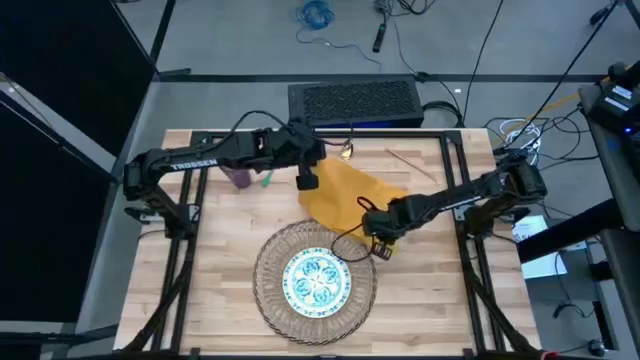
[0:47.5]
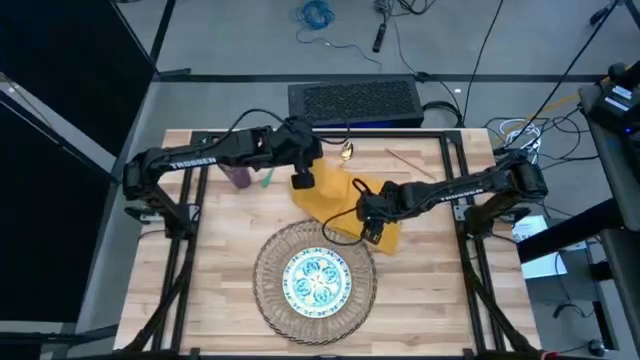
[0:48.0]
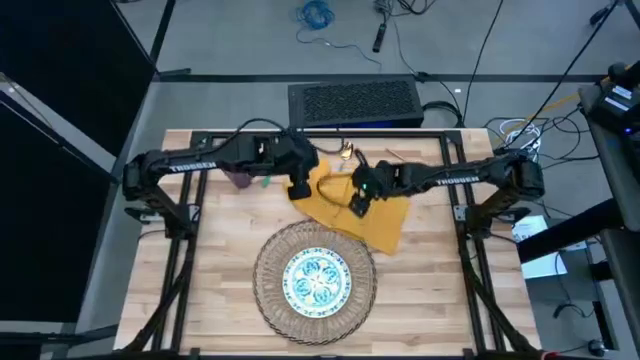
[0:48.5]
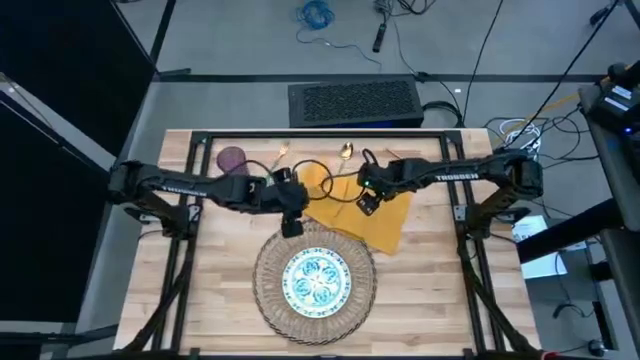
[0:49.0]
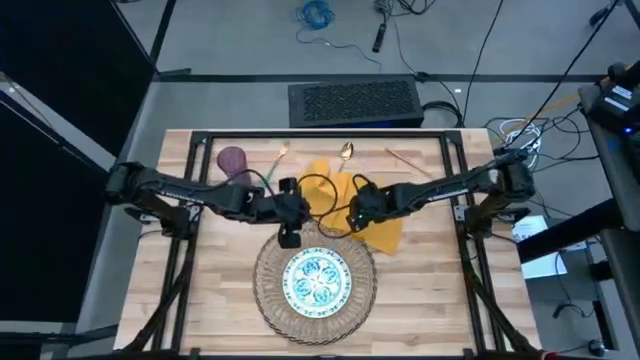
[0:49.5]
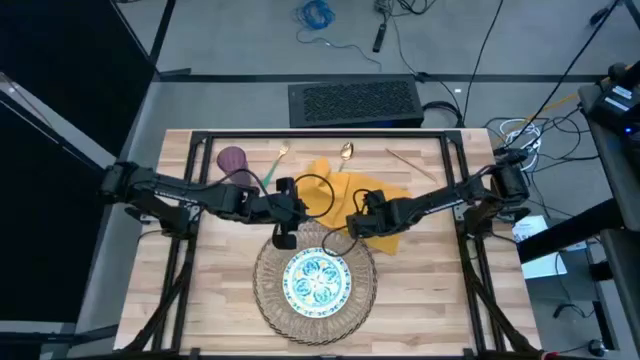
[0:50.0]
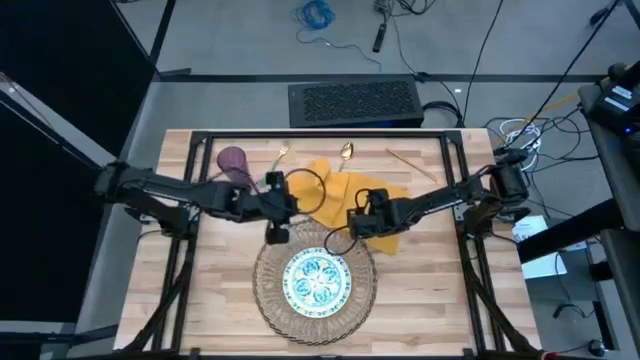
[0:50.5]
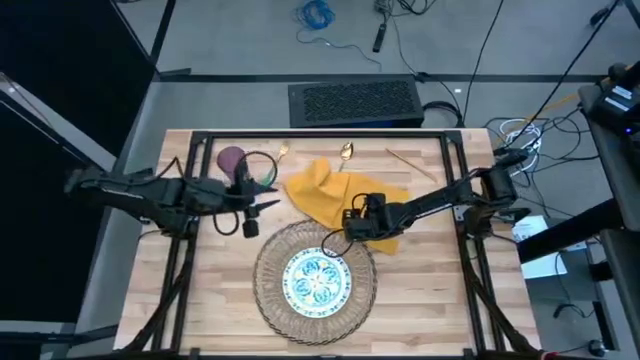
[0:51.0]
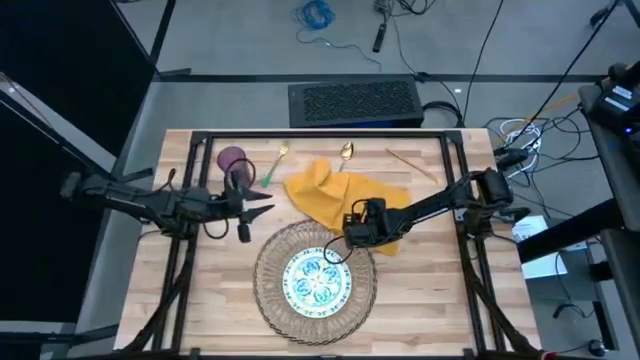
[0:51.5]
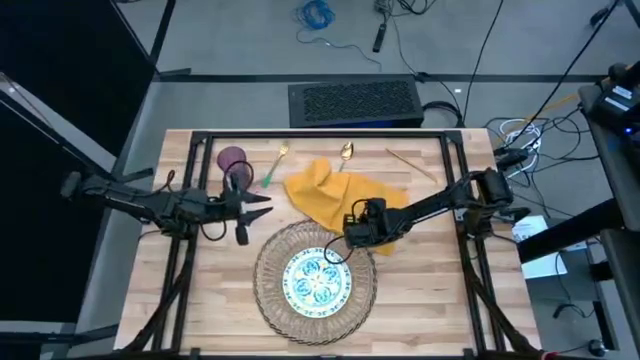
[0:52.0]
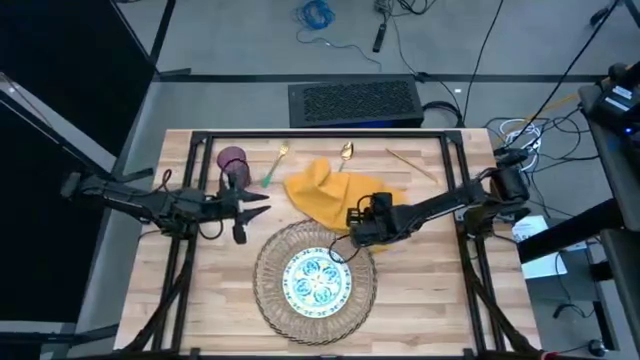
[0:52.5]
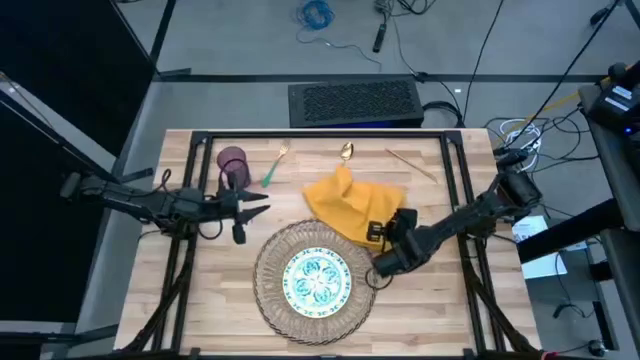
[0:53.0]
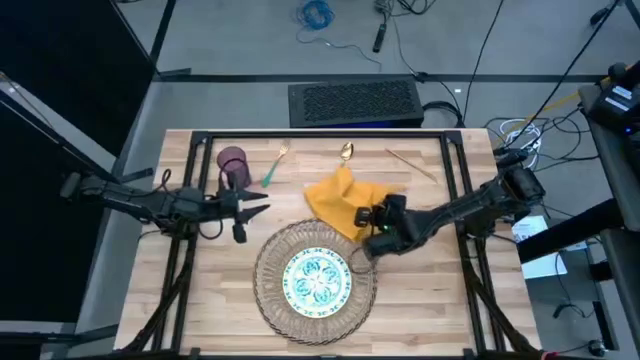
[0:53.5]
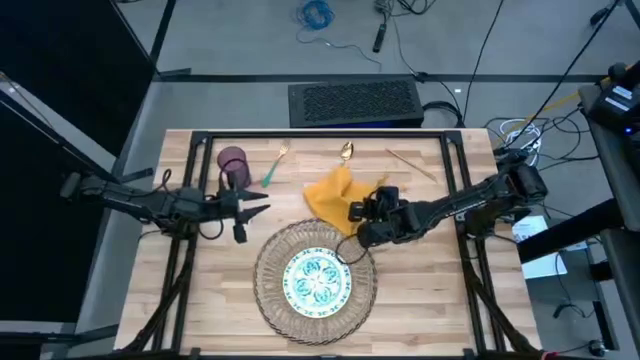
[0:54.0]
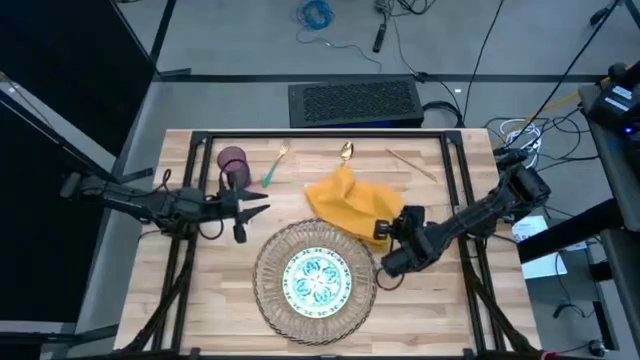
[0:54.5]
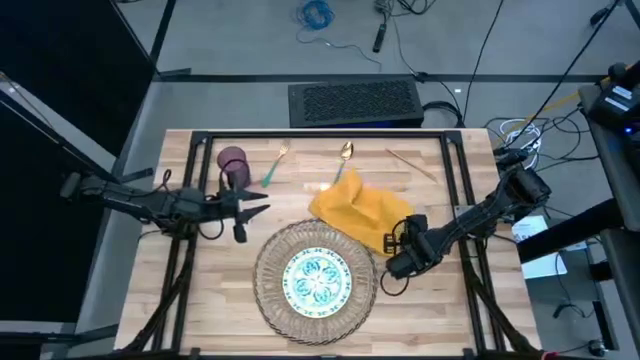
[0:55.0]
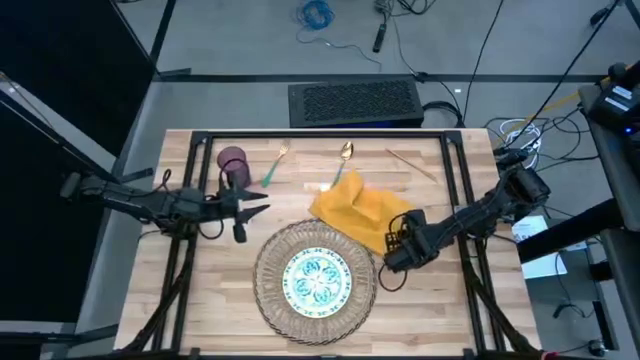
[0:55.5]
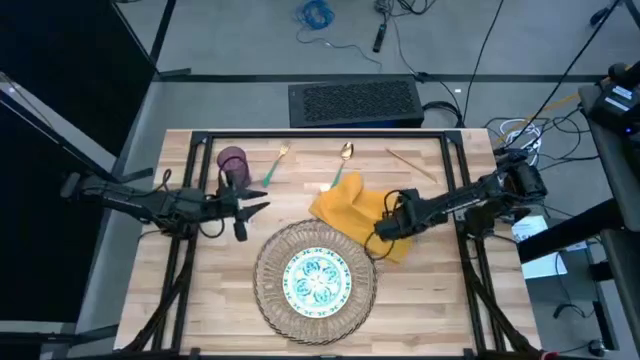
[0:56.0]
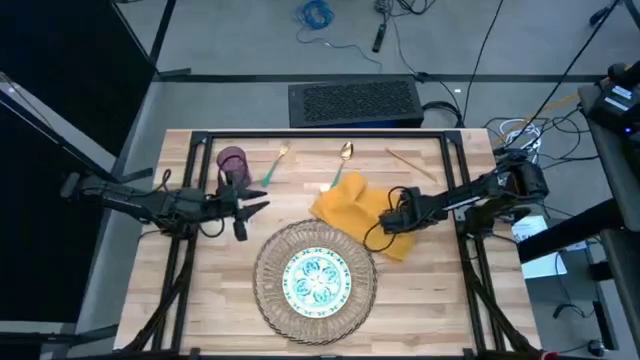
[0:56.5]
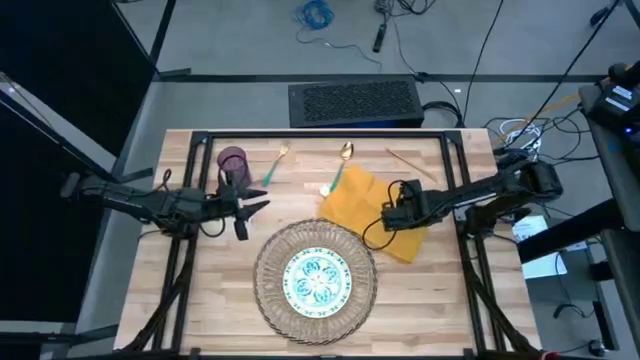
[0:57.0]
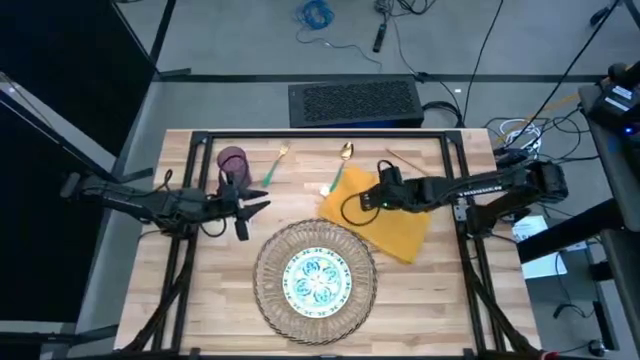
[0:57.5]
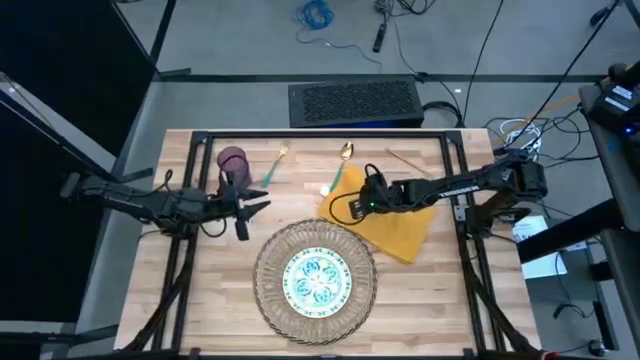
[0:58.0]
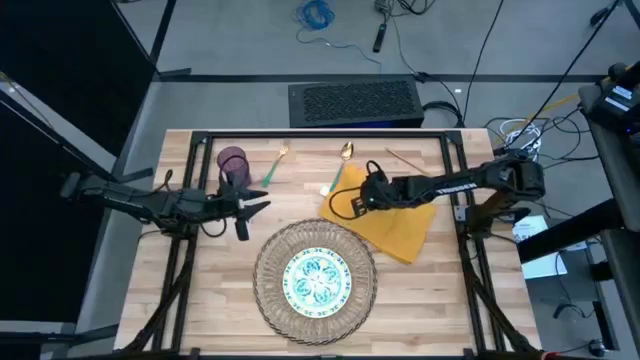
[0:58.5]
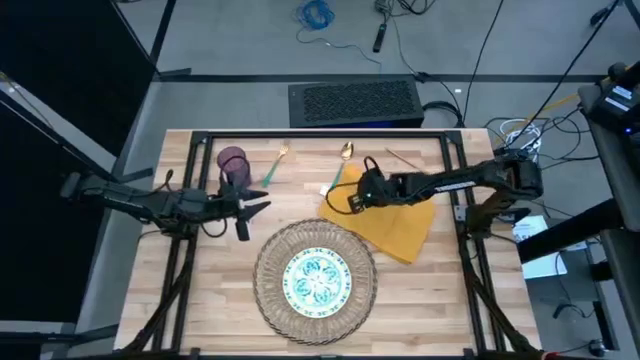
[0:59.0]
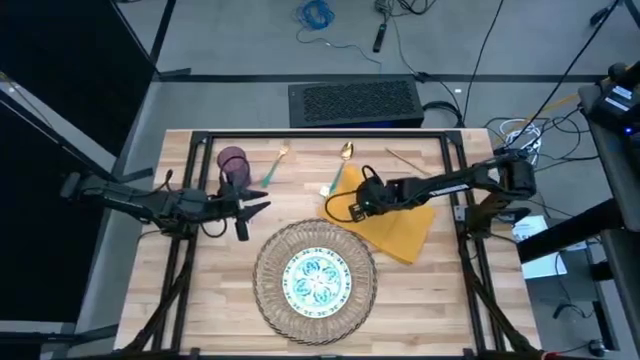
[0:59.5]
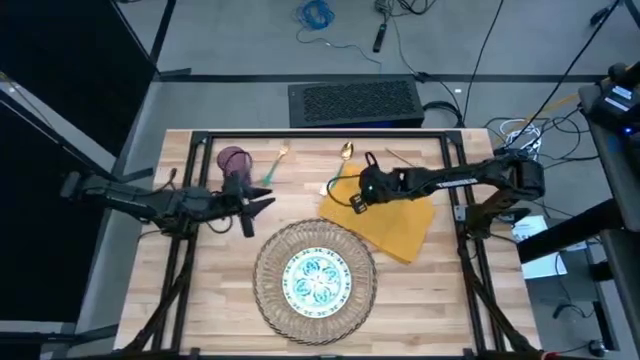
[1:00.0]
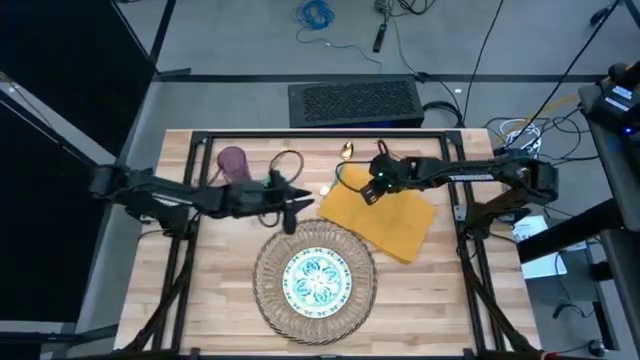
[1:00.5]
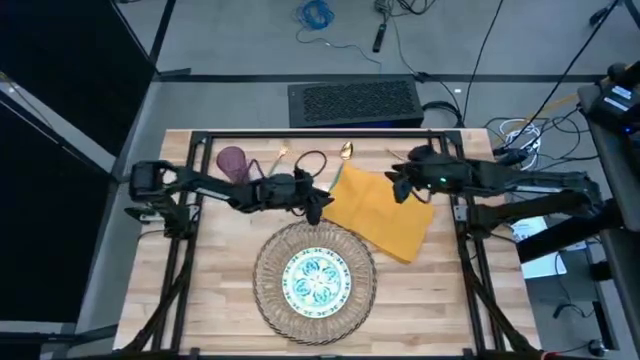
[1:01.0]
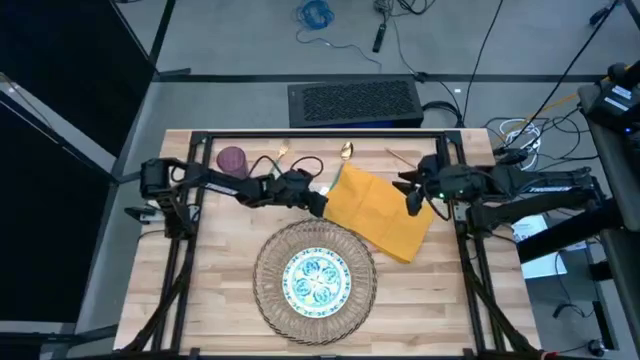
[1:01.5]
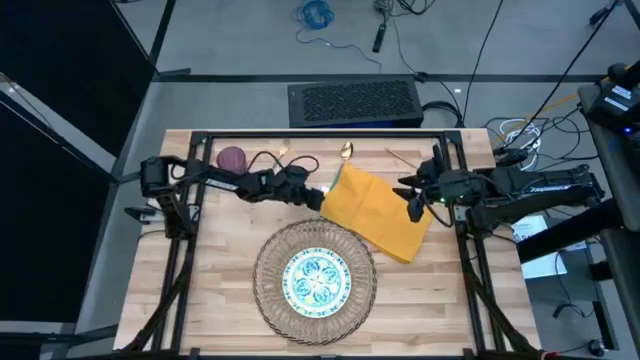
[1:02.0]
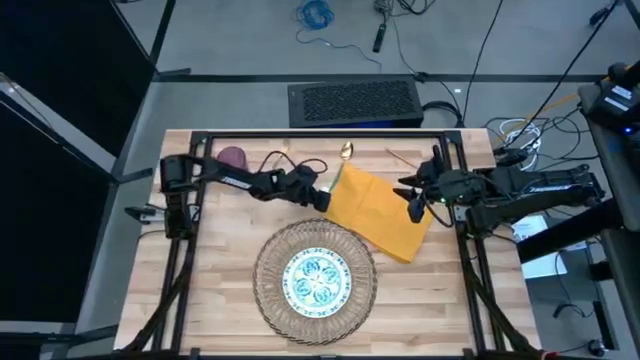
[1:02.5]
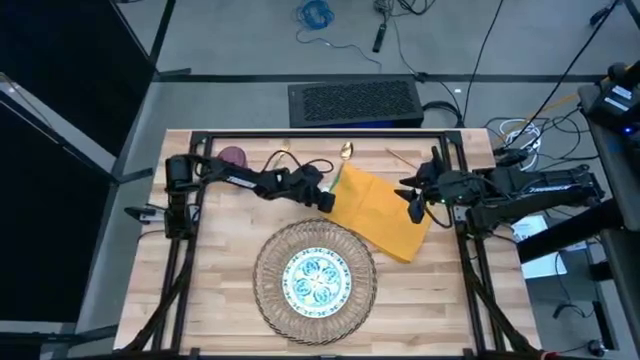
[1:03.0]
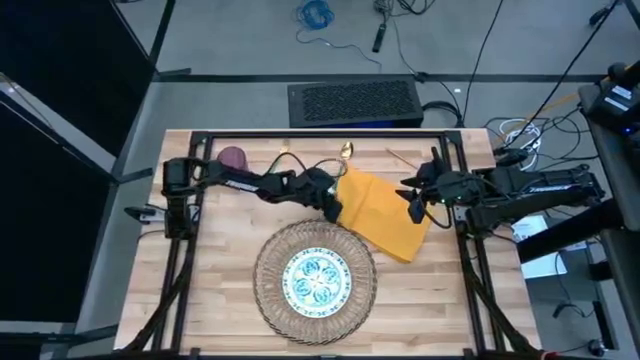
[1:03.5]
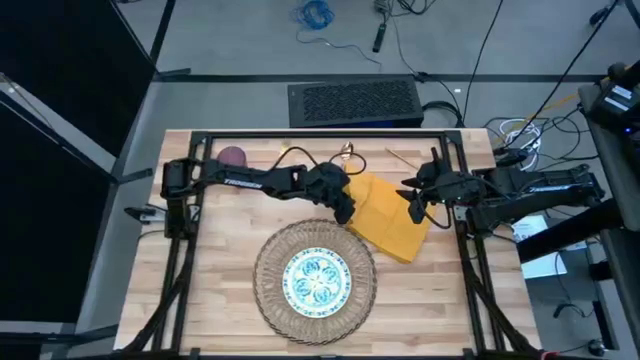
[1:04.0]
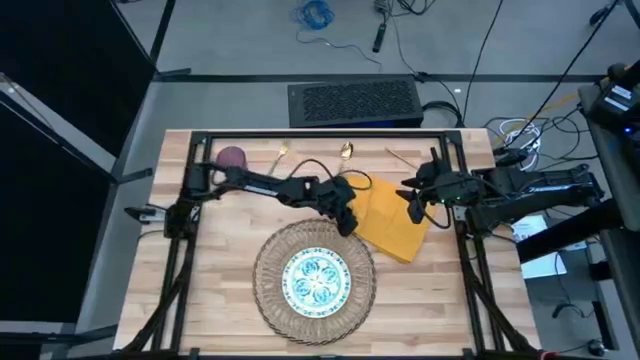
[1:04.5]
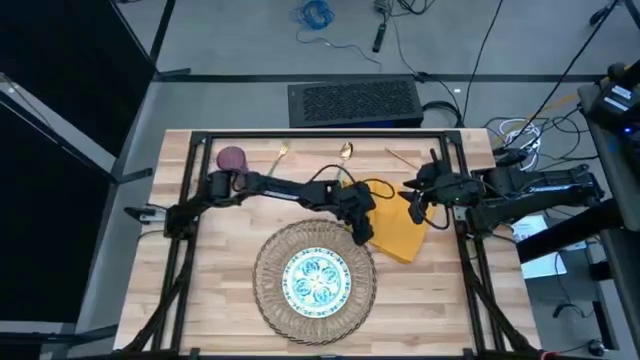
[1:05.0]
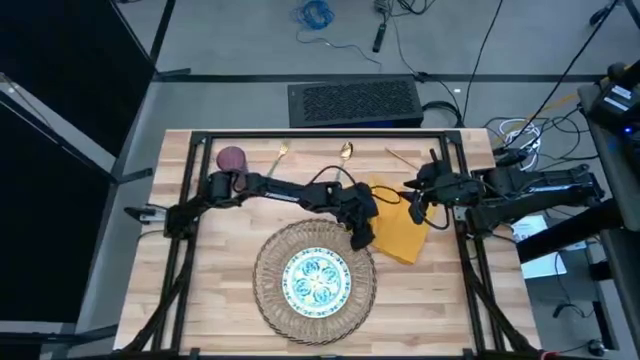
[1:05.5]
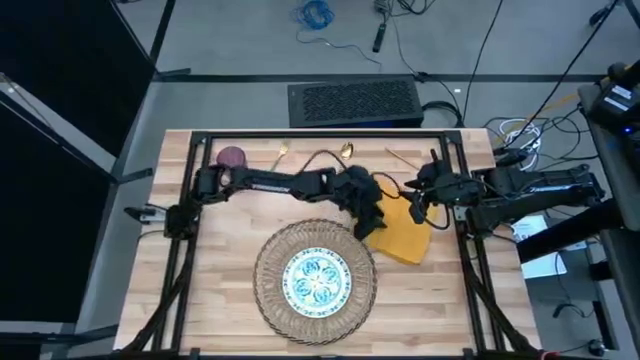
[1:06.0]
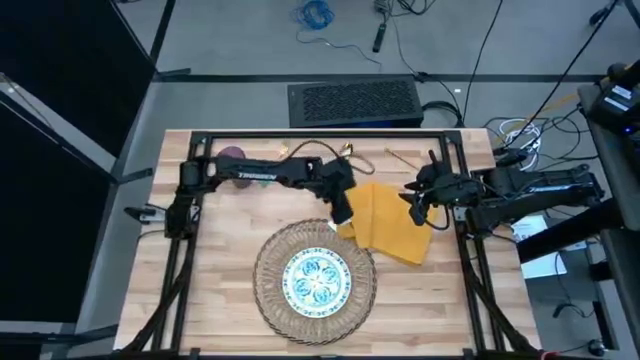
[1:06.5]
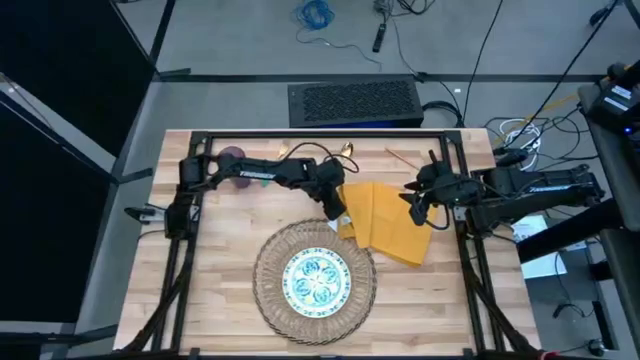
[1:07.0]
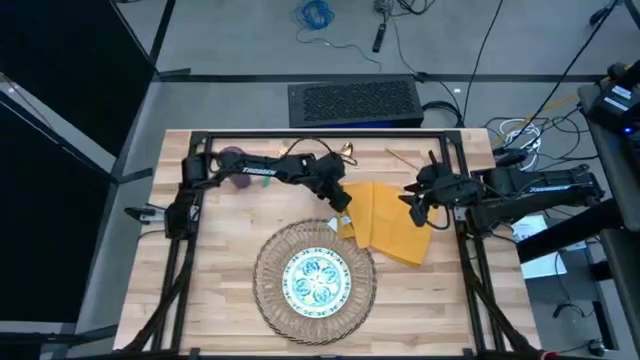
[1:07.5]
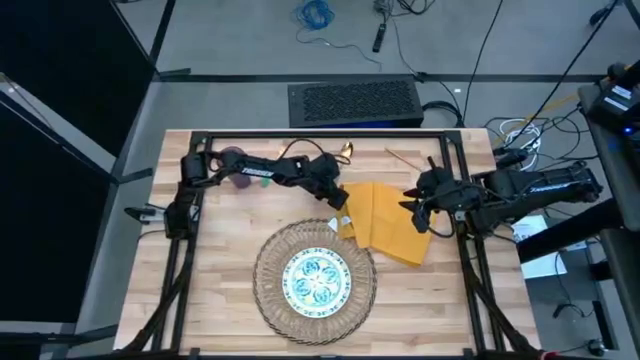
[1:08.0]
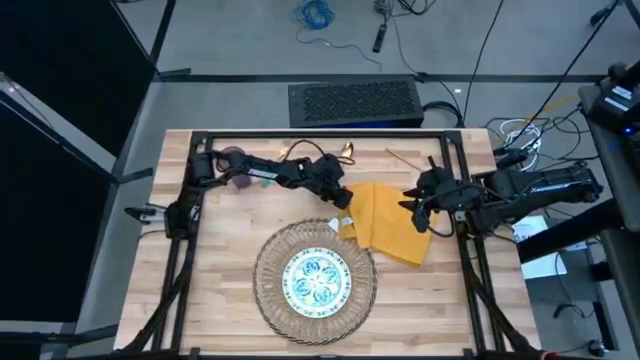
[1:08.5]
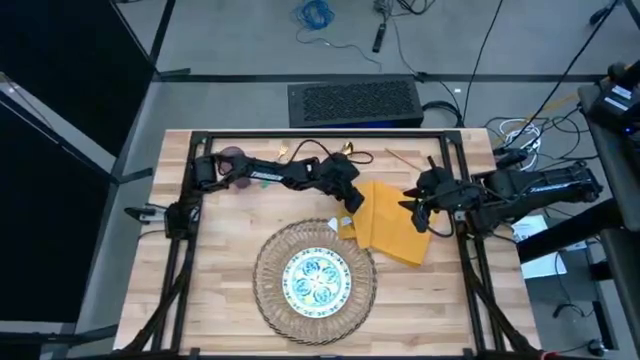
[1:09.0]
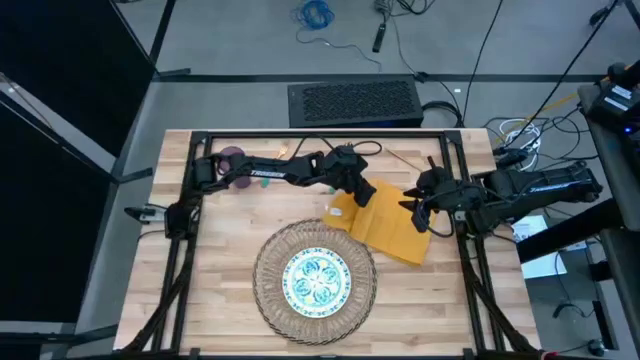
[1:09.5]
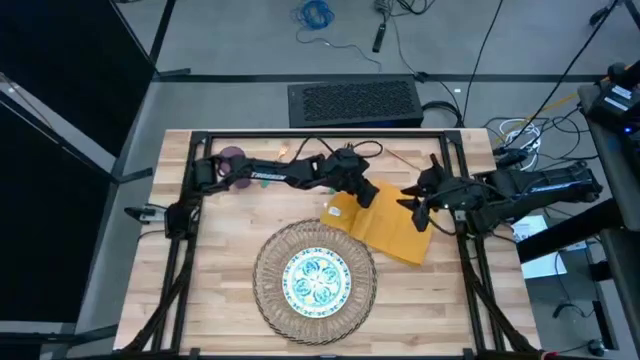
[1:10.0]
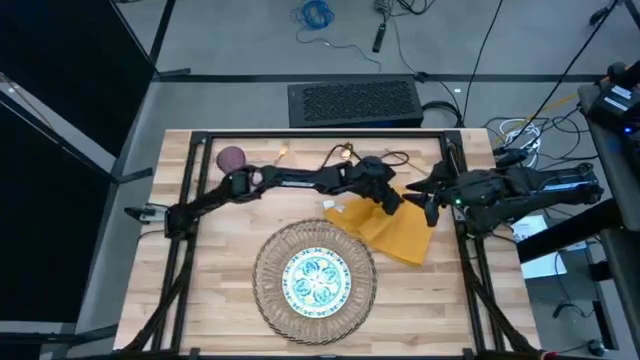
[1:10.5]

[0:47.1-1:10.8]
Task: Set table place
Fold the yellow table napkin
